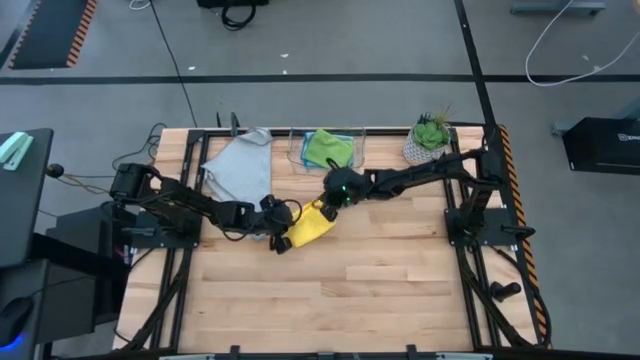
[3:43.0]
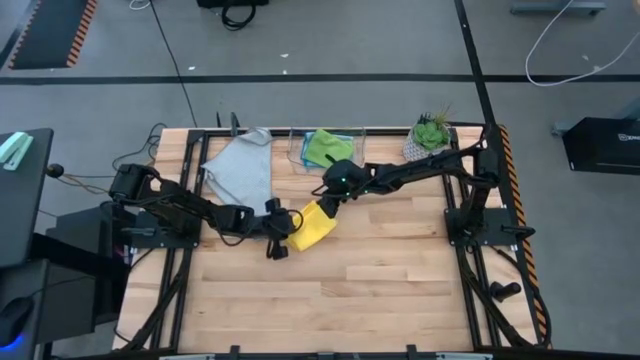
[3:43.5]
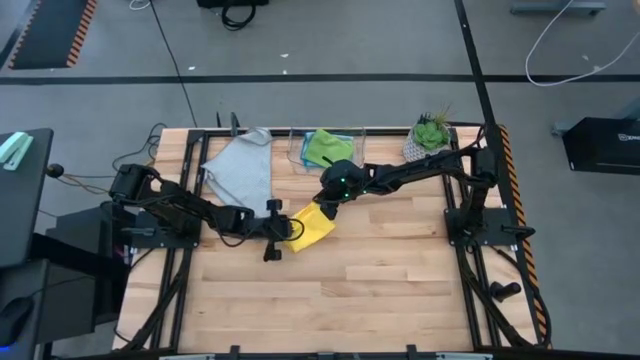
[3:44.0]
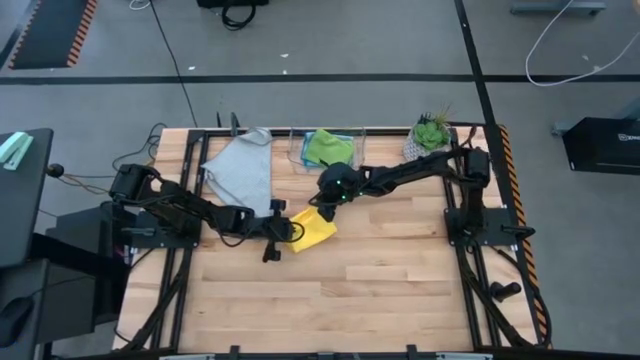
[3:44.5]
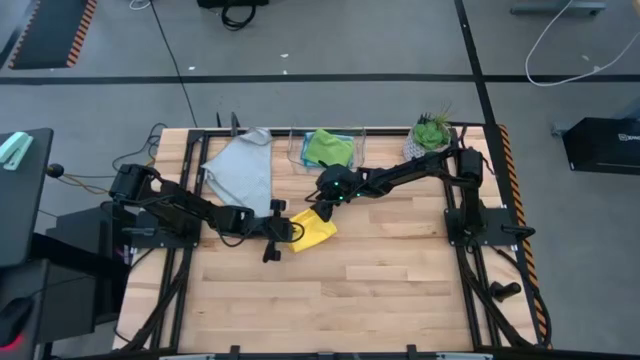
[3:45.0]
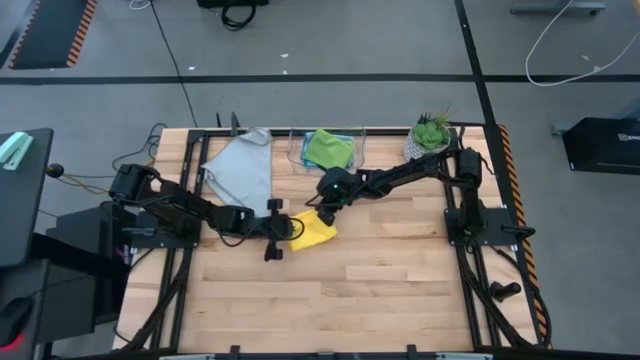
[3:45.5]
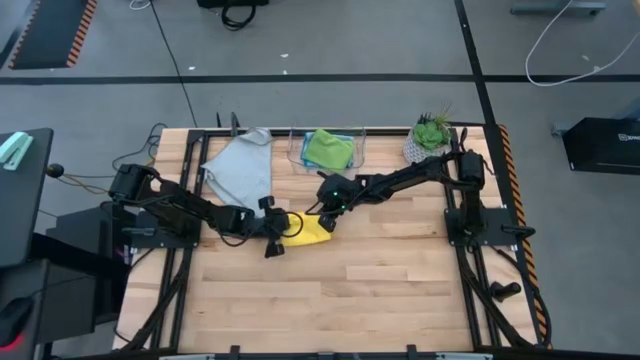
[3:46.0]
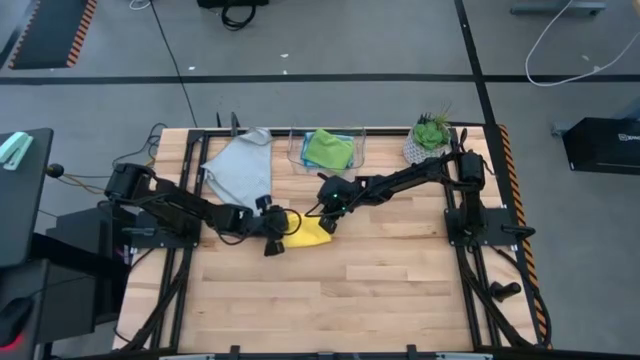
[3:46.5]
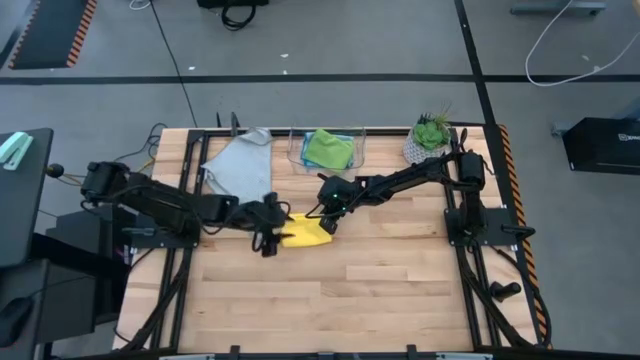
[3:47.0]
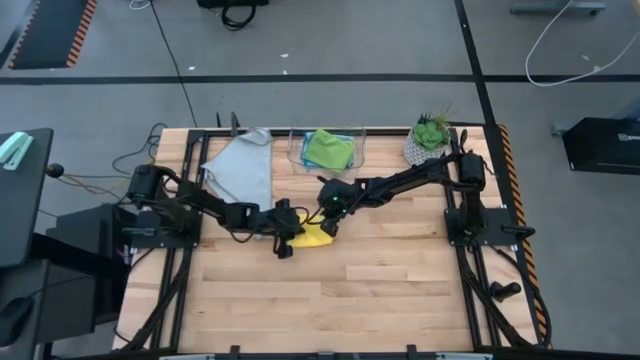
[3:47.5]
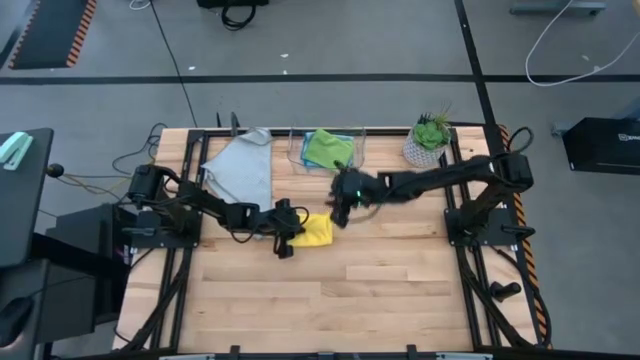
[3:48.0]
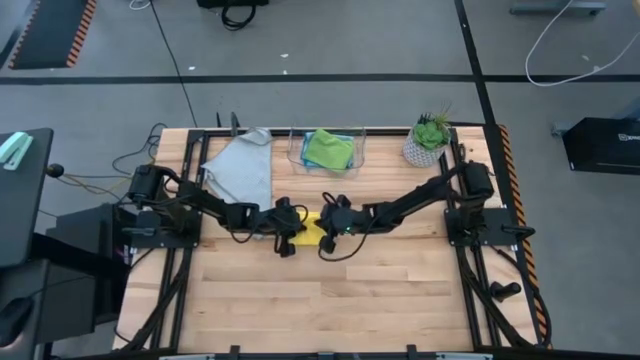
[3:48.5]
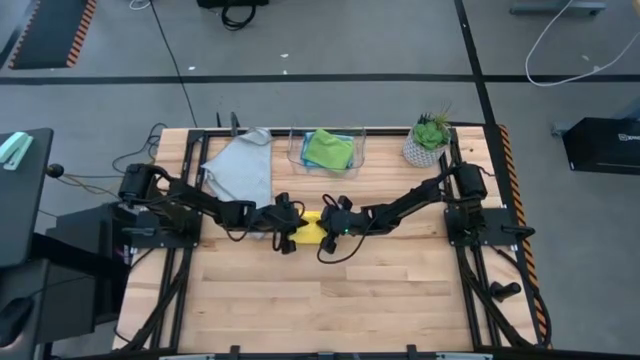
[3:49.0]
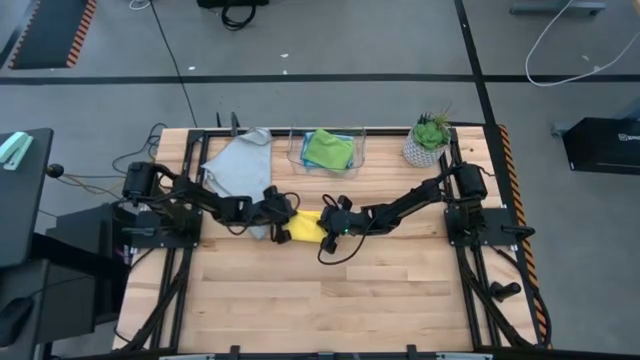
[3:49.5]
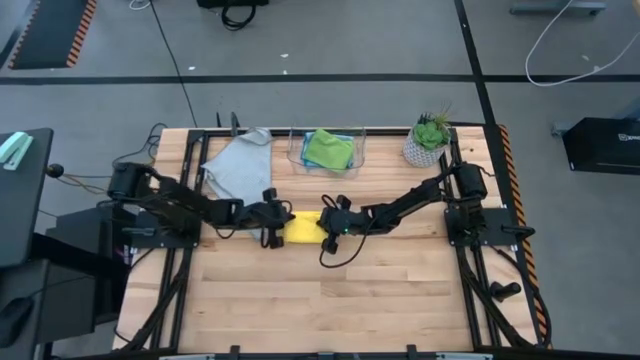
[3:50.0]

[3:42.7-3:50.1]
Task: Fold microfiber towels
Fold the yellow microfiber towel

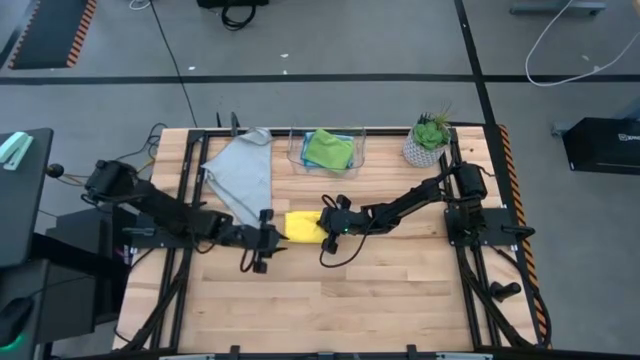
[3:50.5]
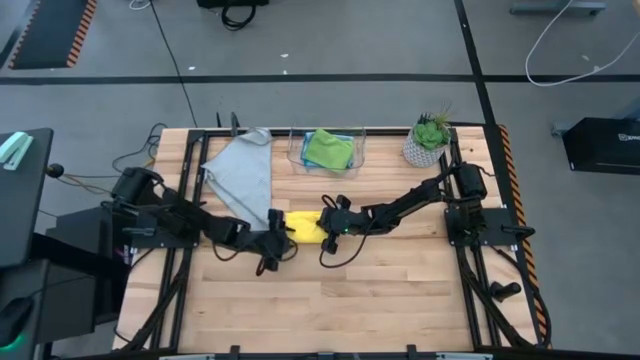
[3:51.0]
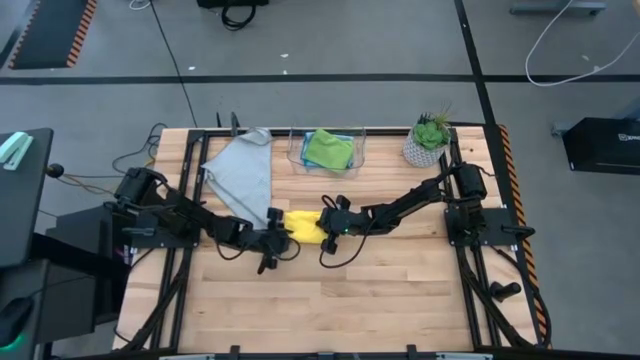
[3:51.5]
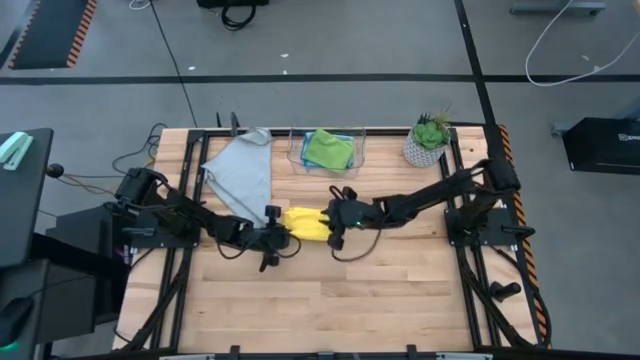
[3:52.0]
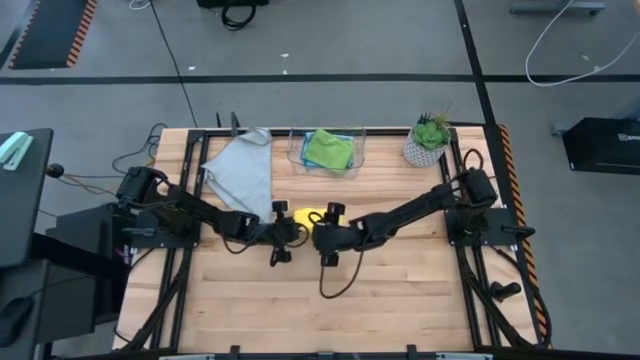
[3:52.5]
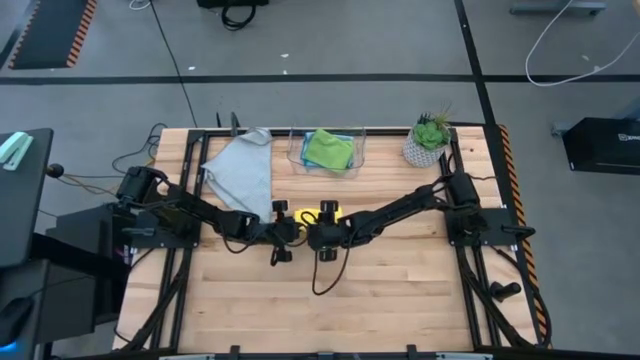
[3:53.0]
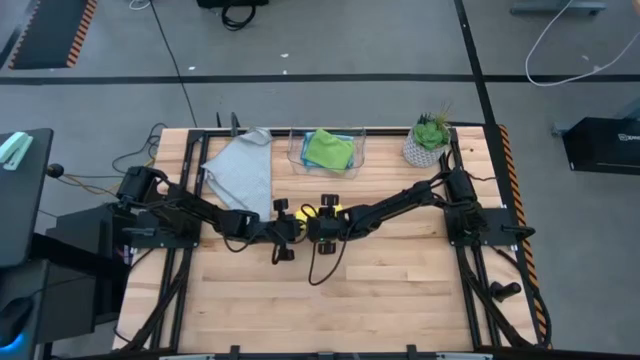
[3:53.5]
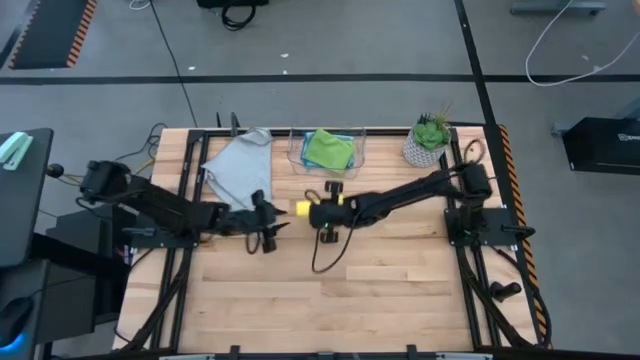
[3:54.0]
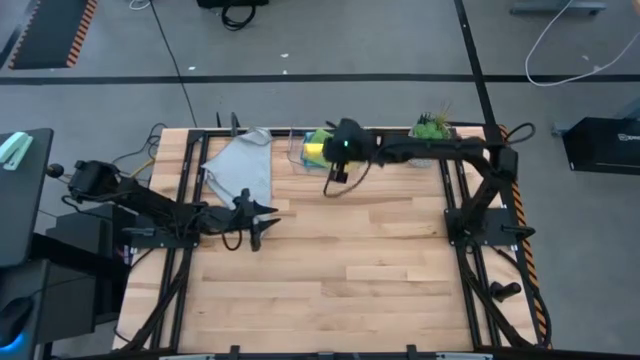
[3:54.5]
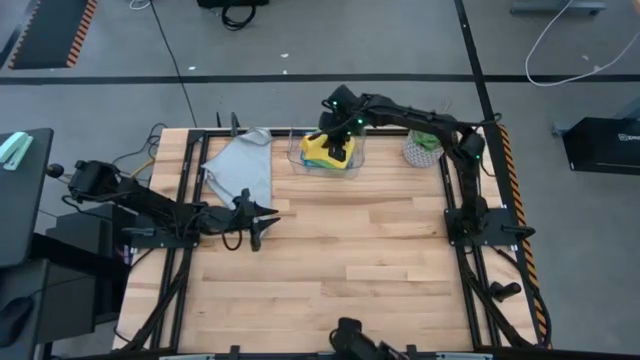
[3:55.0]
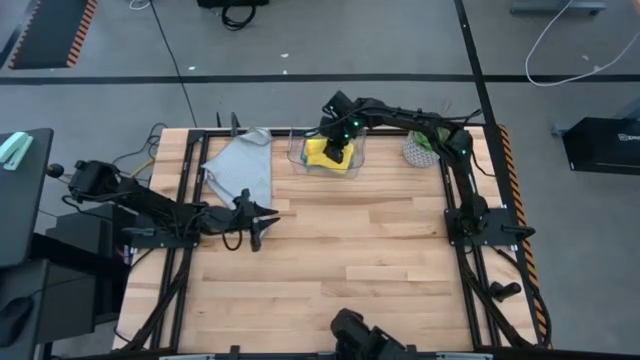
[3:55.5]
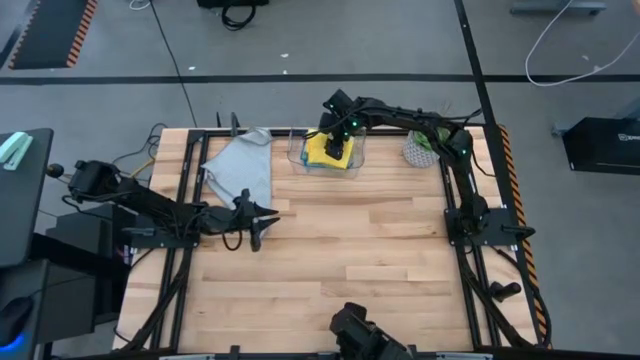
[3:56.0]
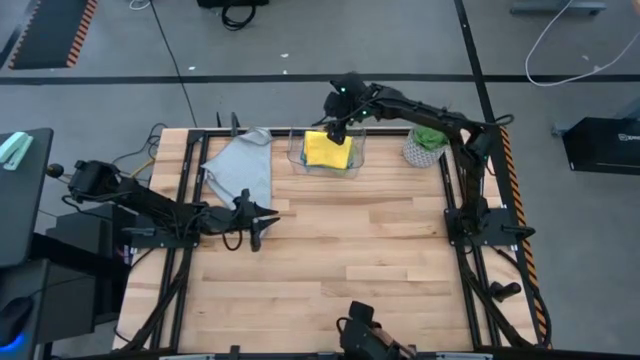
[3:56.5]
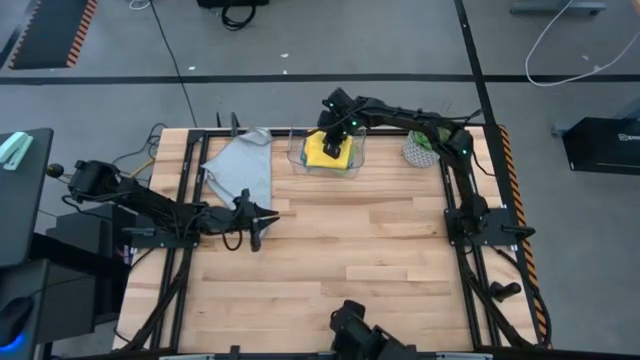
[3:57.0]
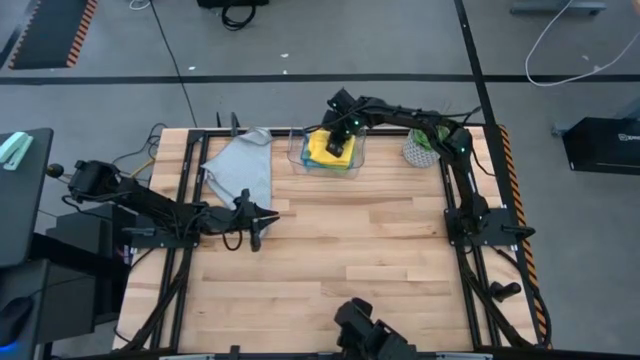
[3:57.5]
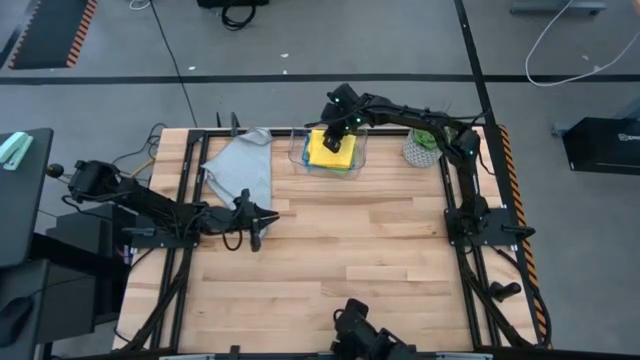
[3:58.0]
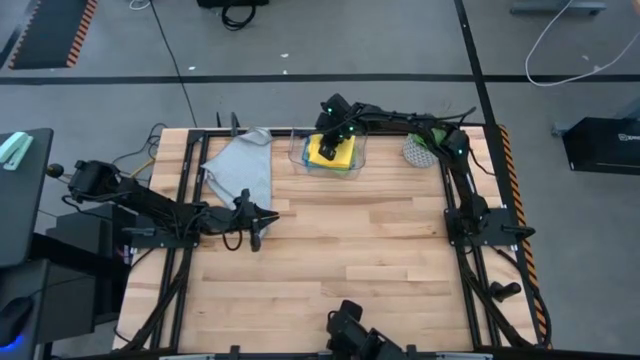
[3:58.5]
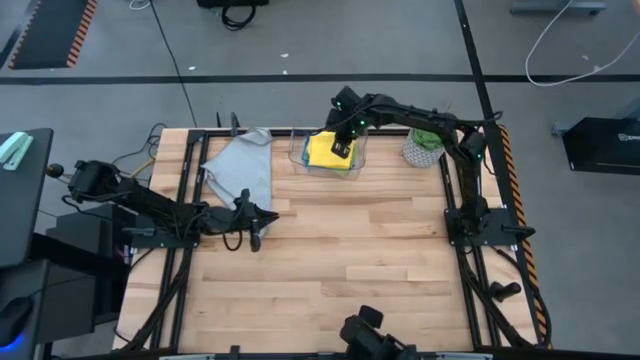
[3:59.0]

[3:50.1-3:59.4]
Put the folded yellow microfiber towel into the transparent bin
